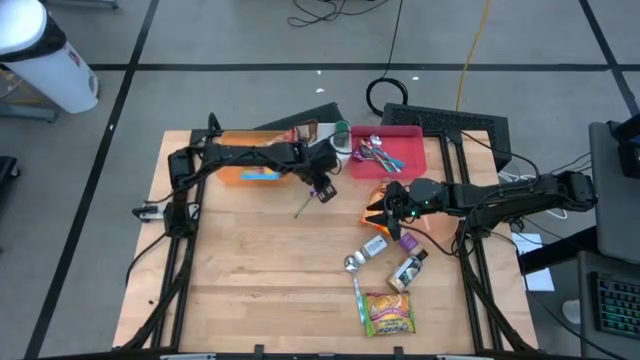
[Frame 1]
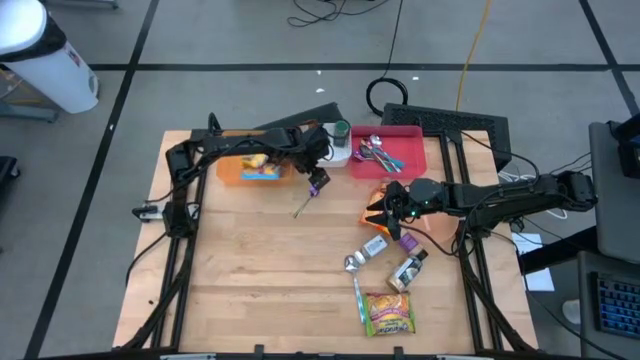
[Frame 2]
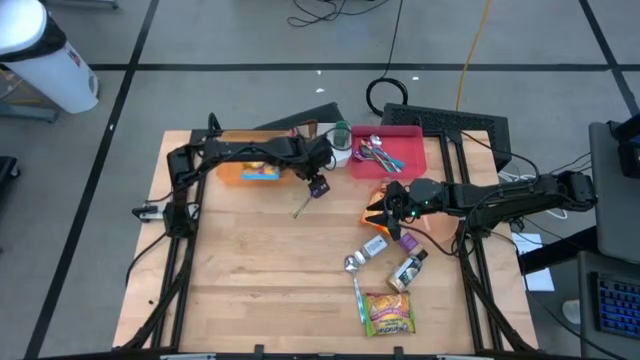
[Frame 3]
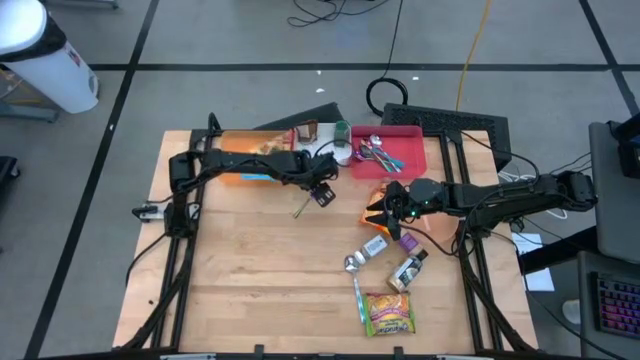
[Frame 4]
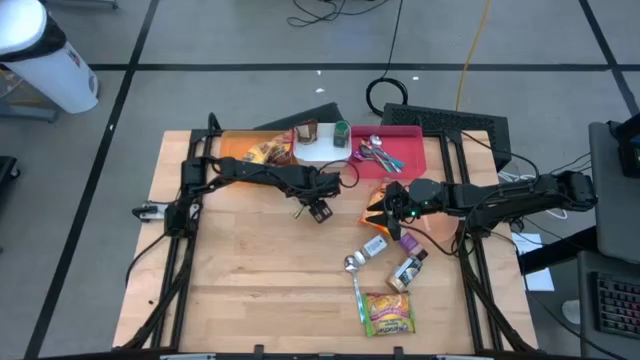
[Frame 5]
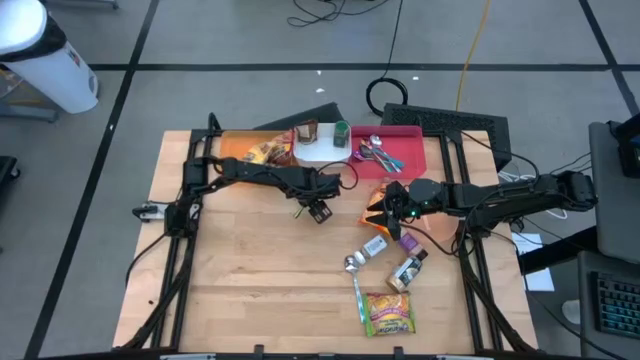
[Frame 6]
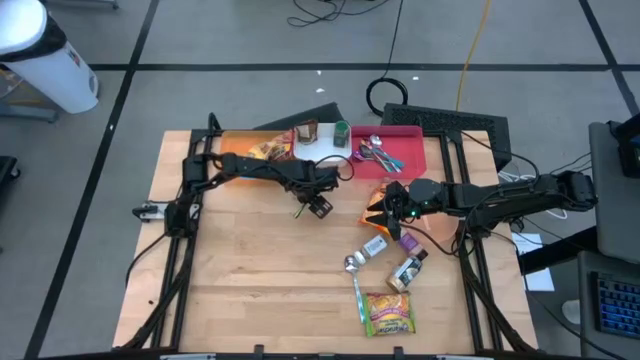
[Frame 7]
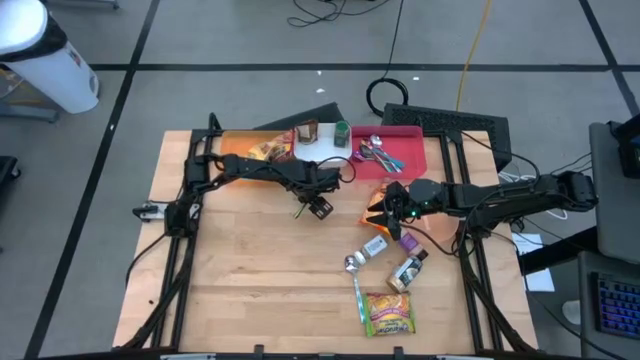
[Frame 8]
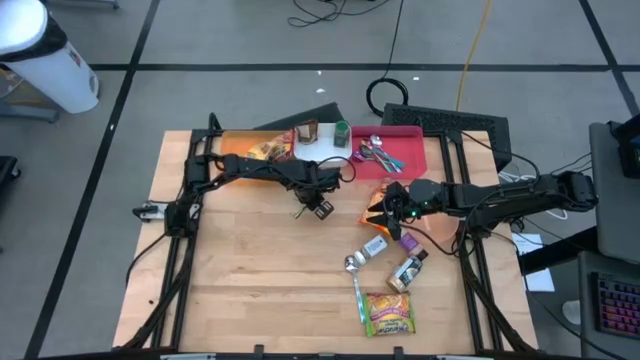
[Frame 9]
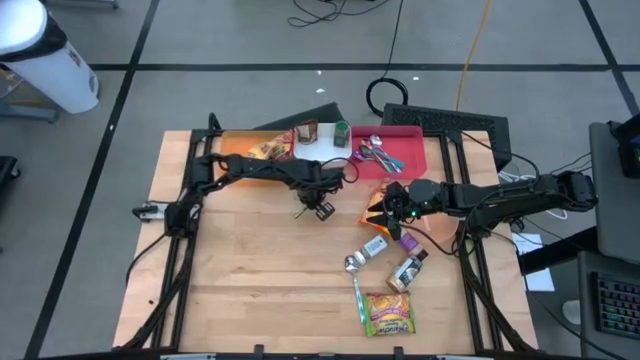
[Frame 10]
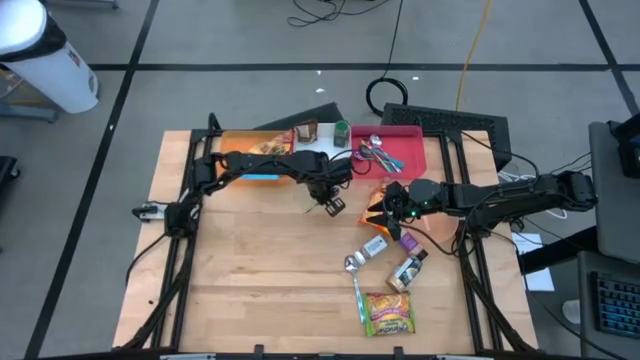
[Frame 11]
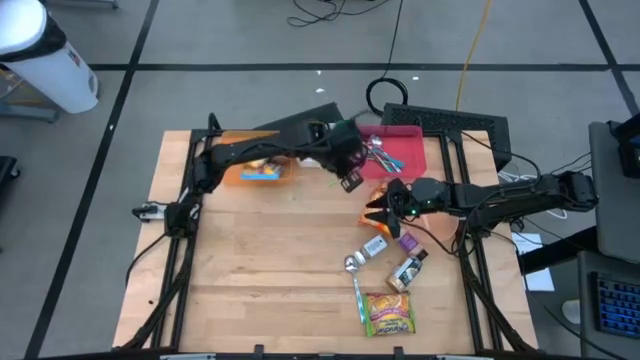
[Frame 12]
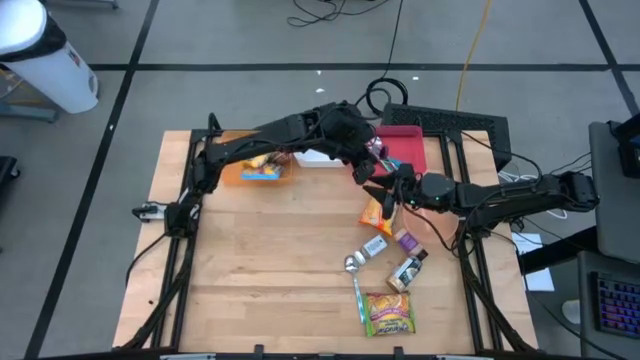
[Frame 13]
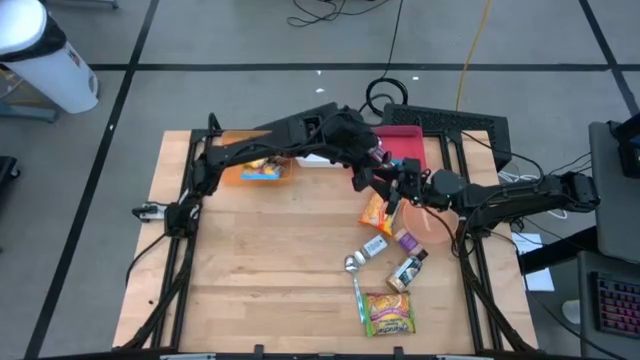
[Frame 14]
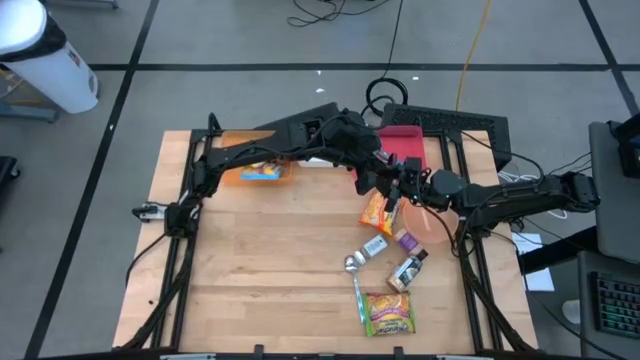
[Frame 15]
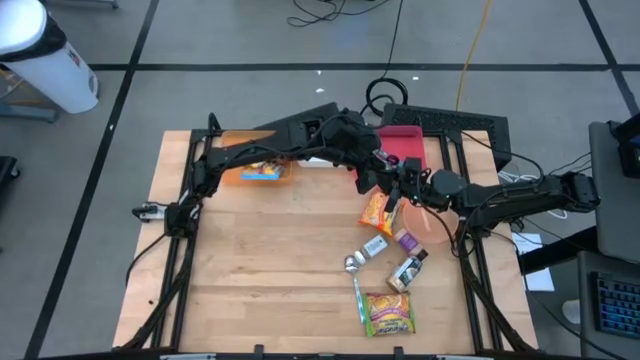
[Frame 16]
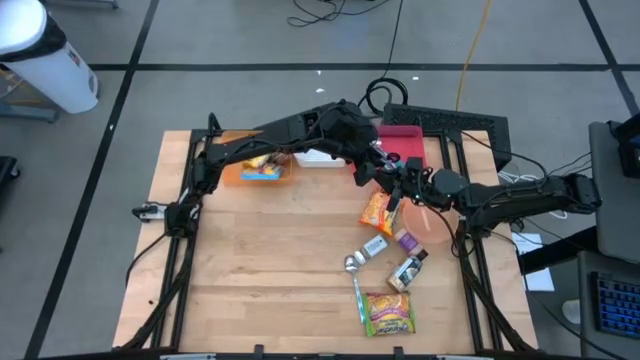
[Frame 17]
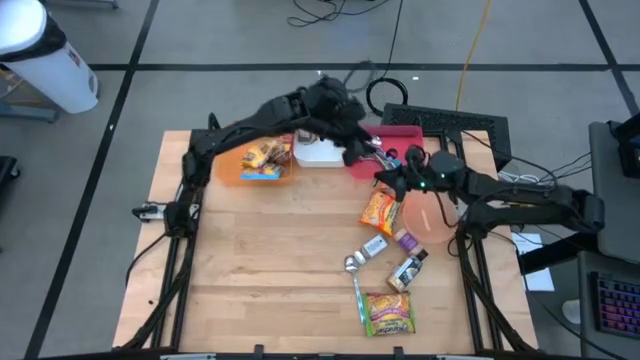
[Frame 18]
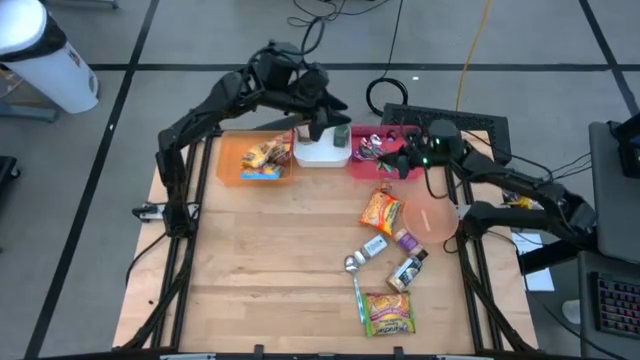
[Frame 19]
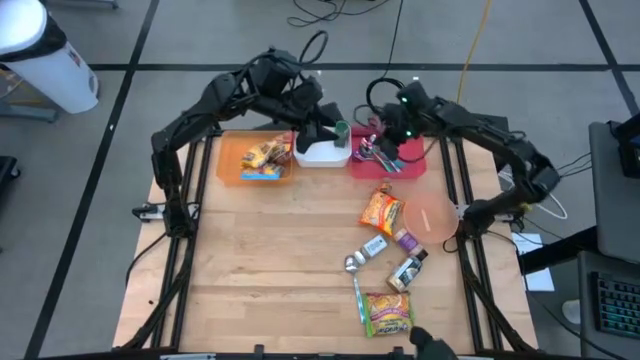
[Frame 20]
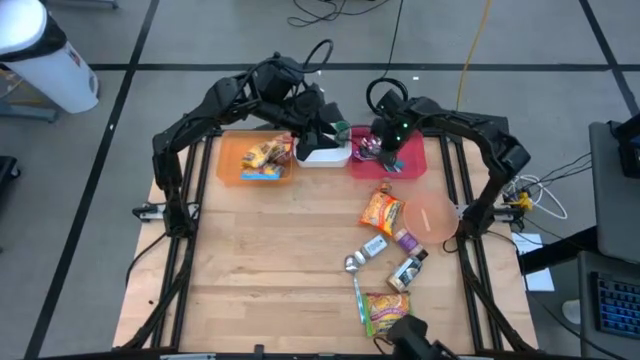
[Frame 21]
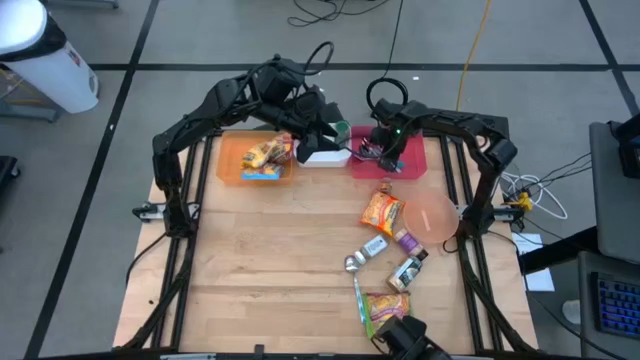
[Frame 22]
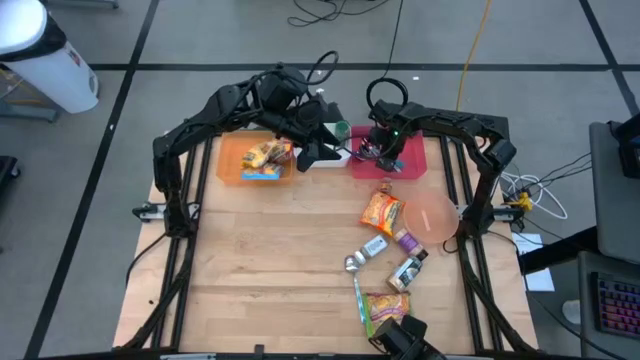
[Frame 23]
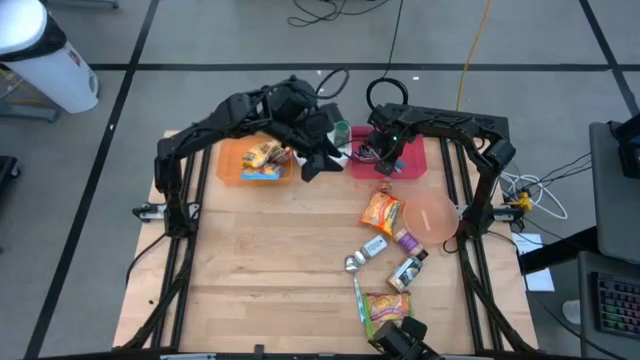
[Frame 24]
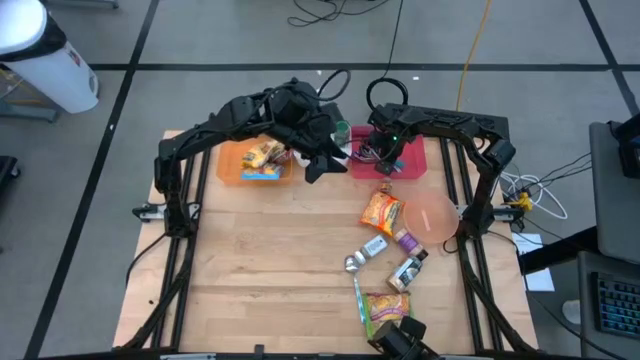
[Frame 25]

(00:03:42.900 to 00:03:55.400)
Task: Pick & Place Food Item
Put the violet spoon into the red bin
